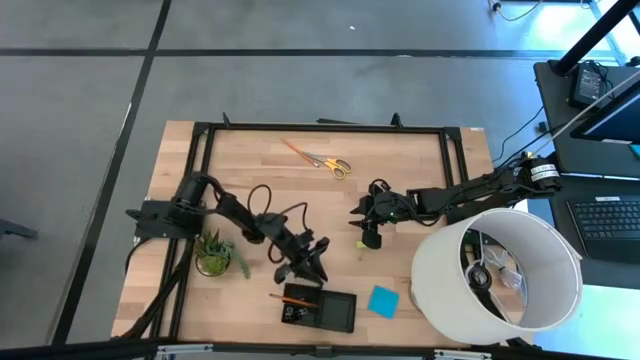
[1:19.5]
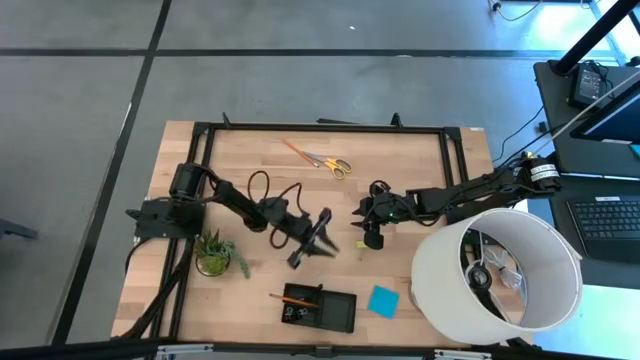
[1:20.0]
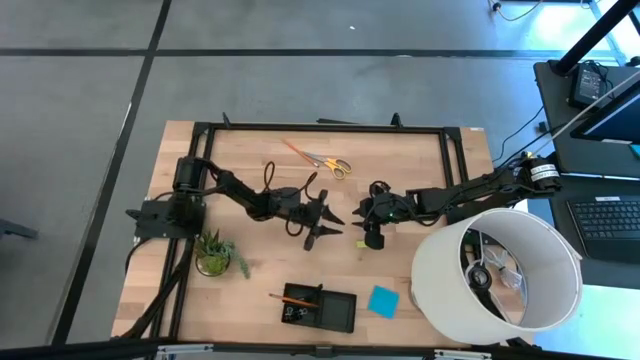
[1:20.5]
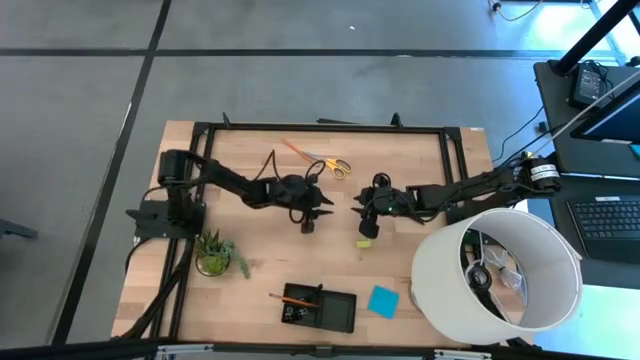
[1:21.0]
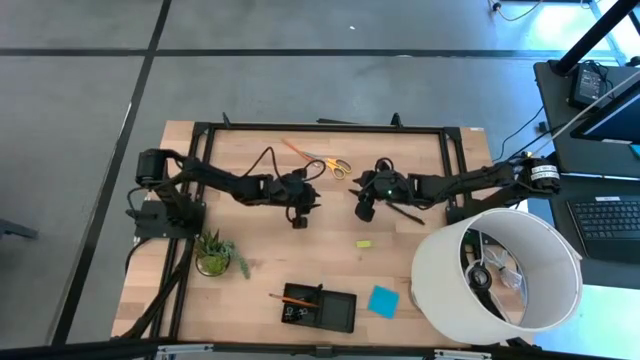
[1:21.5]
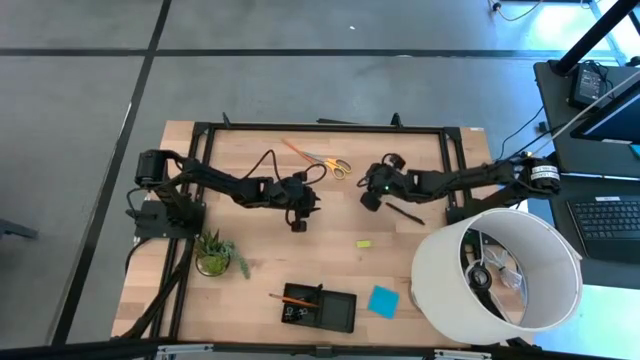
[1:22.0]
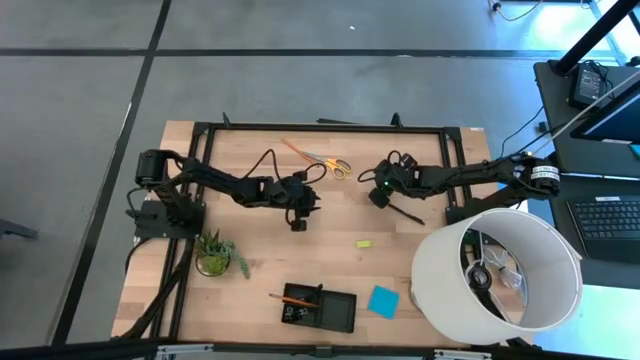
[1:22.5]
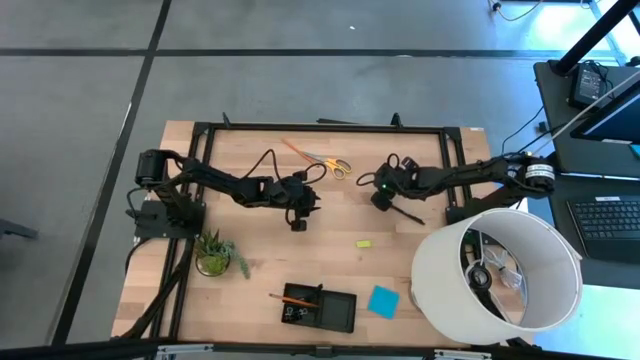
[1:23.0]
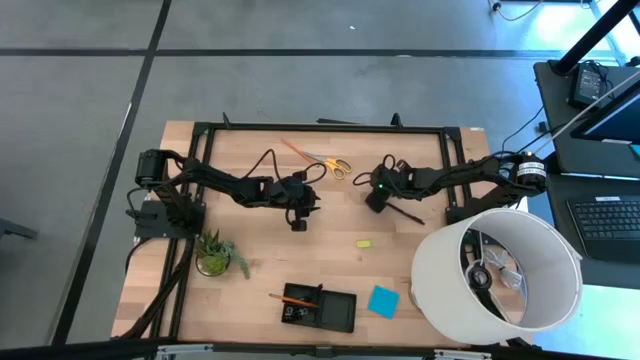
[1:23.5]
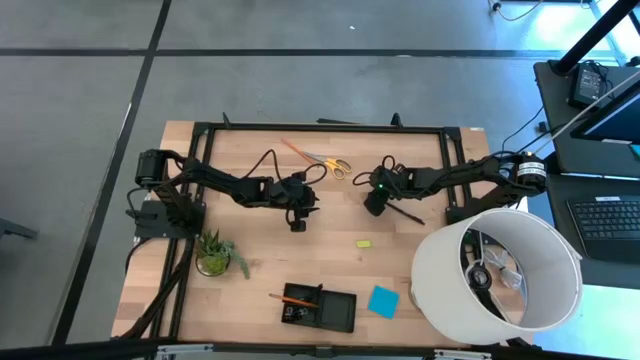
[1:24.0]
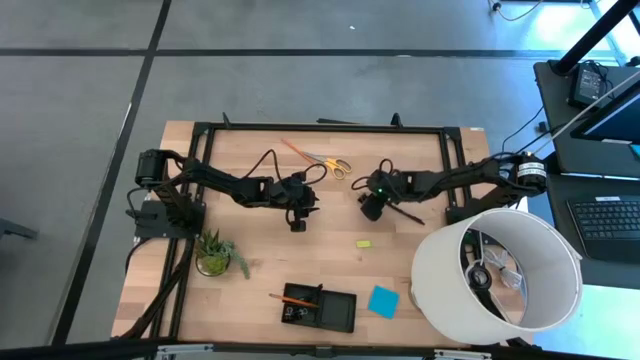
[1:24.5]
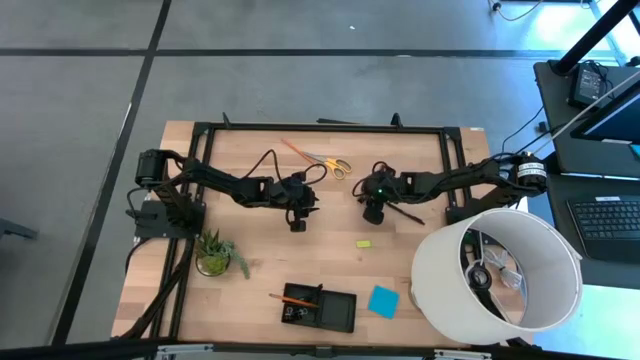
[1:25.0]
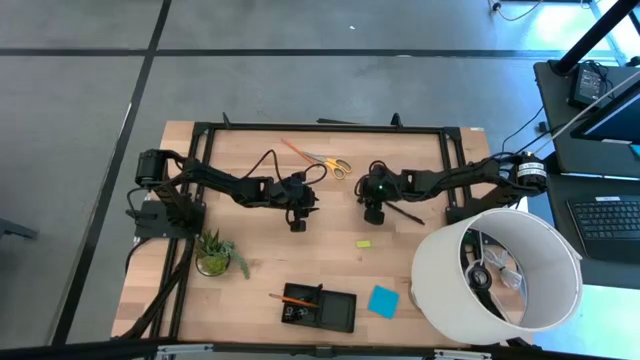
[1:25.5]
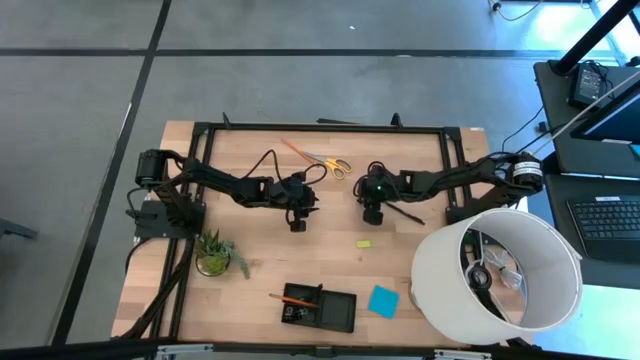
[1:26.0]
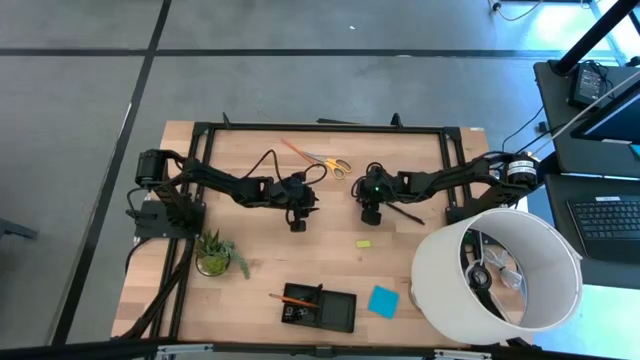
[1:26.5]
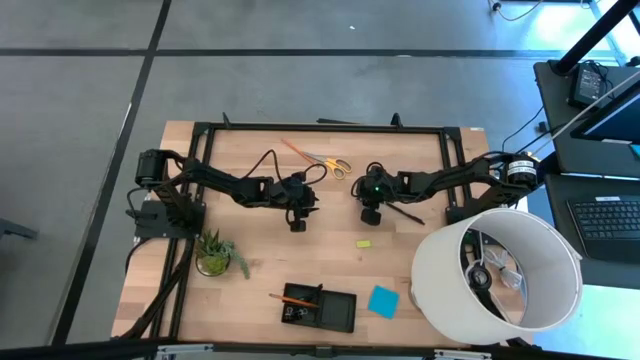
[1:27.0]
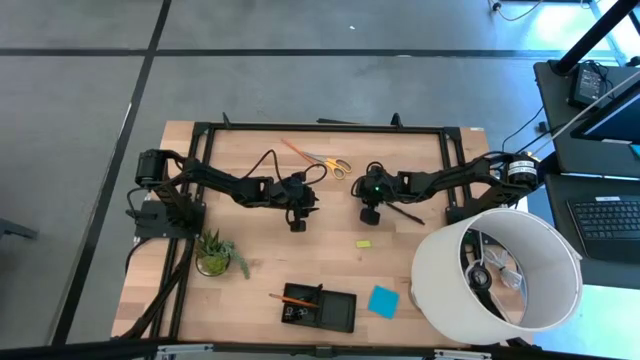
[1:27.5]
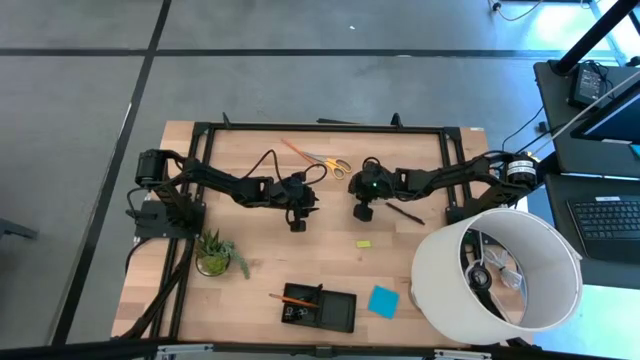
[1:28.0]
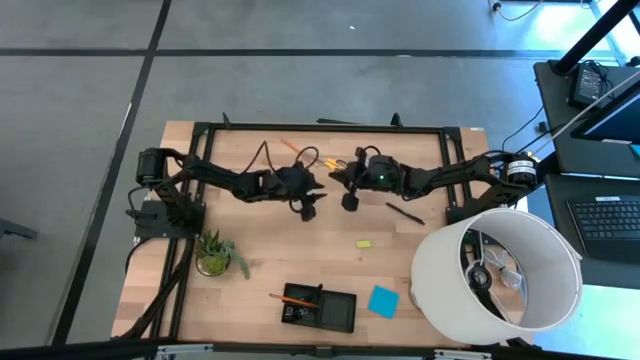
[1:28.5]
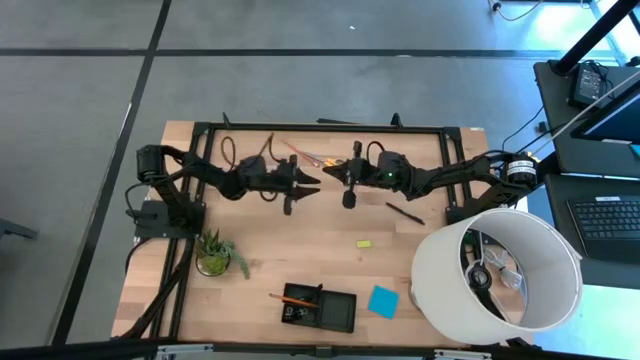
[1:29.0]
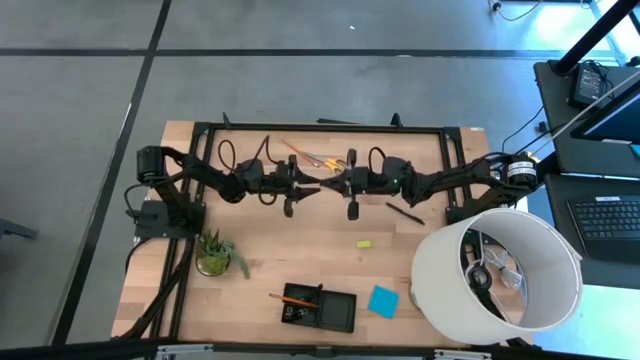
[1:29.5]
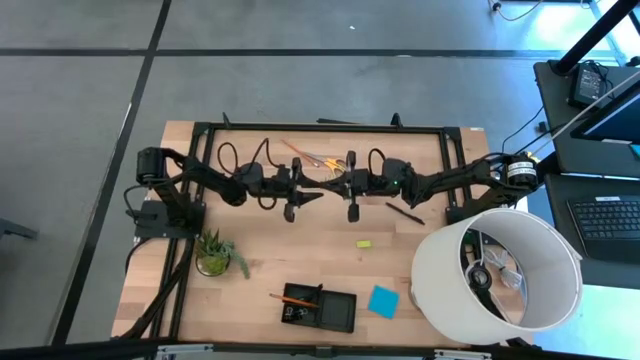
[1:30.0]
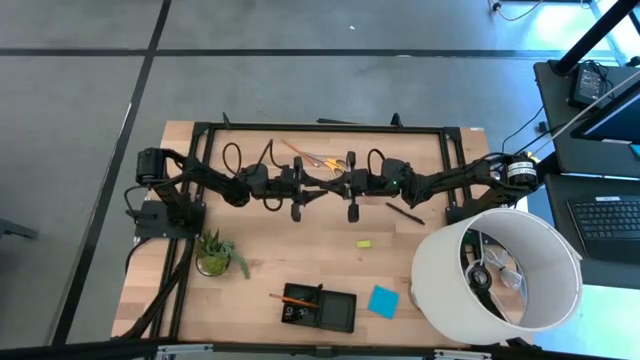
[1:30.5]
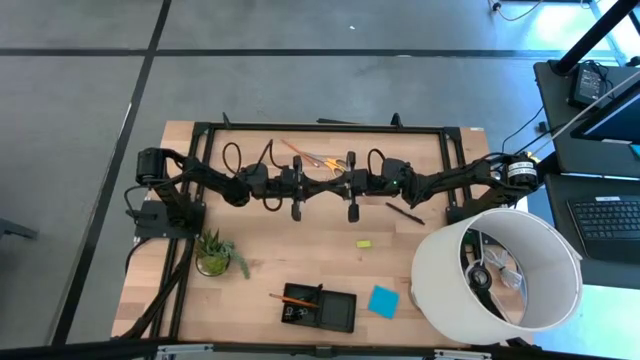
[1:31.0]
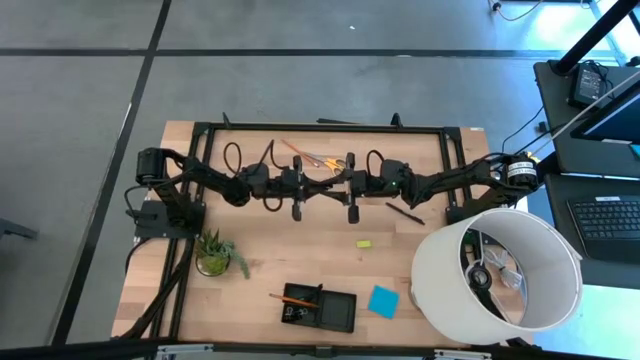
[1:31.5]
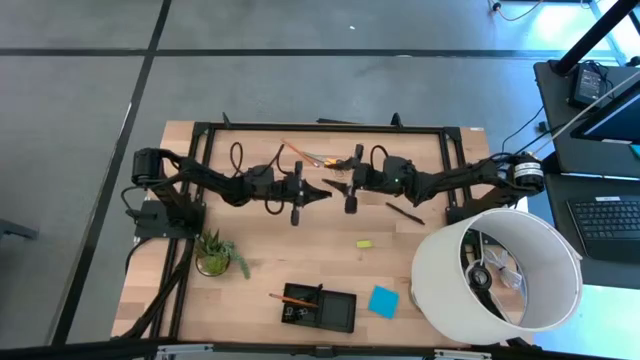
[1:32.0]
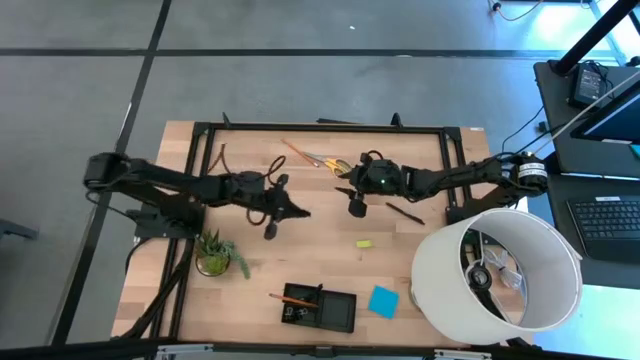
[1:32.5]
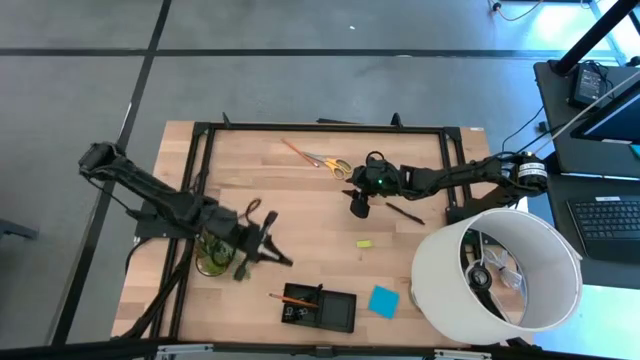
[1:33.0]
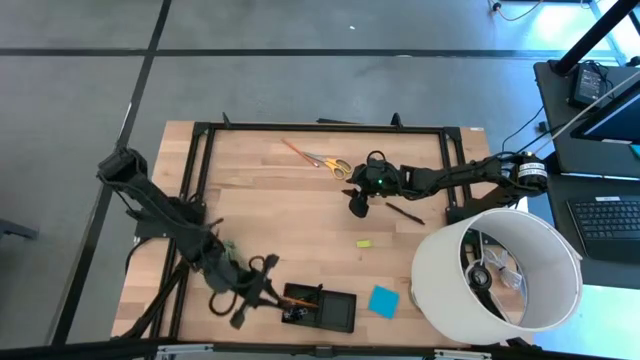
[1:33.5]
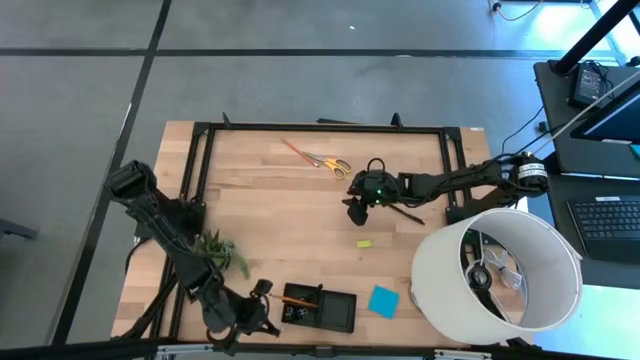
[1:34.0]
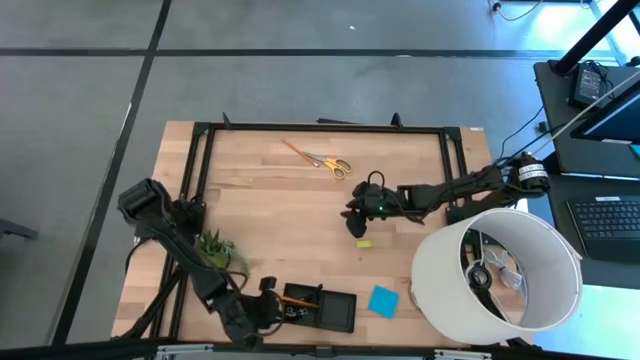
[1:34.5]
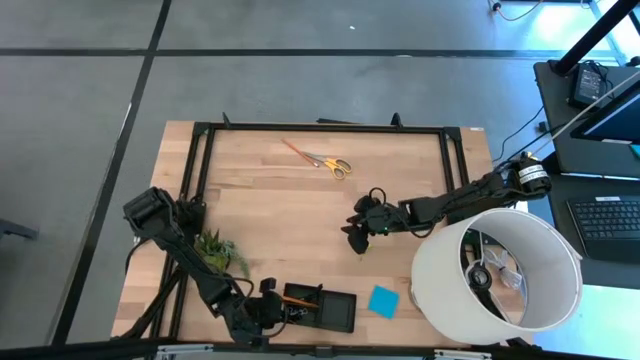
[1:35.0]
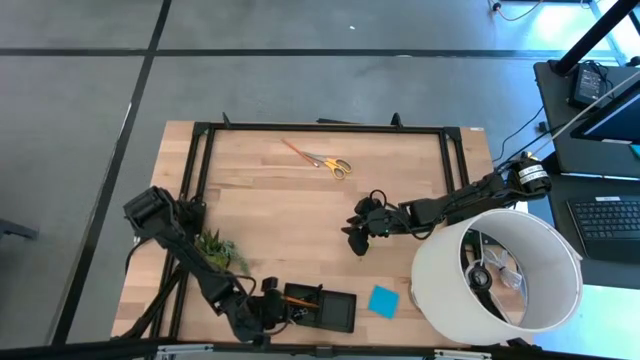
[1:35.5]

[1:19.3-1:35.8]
Task: Pick and place office supplies into organizer
Put the black binder clip into the black desk organizer

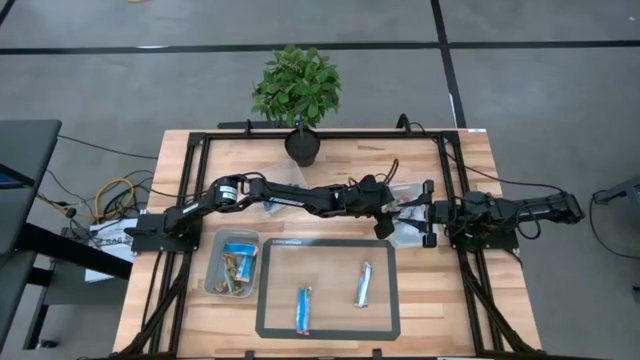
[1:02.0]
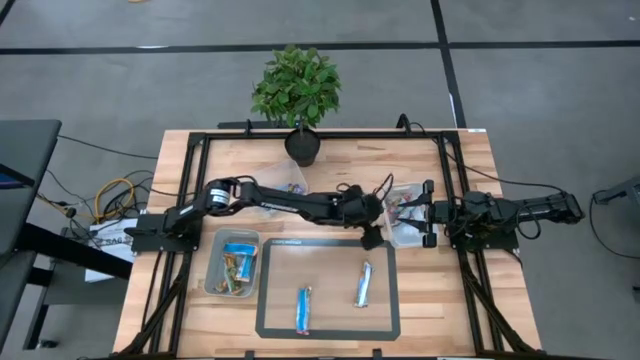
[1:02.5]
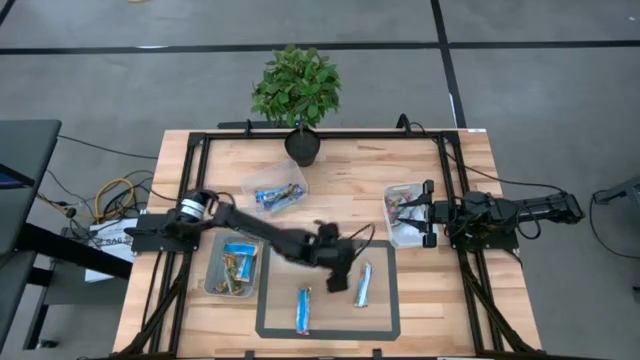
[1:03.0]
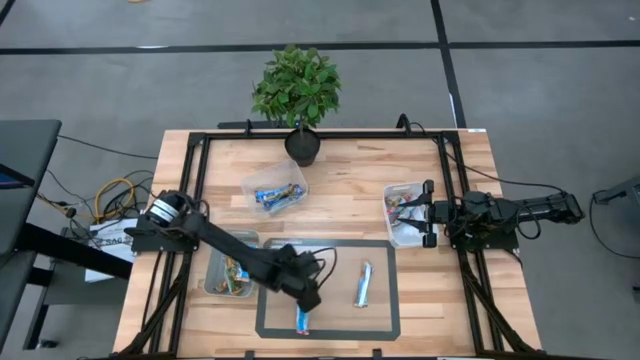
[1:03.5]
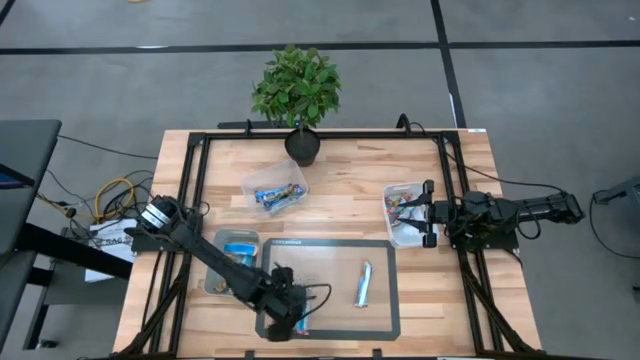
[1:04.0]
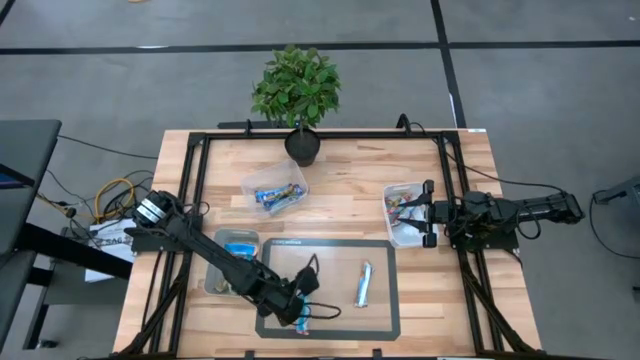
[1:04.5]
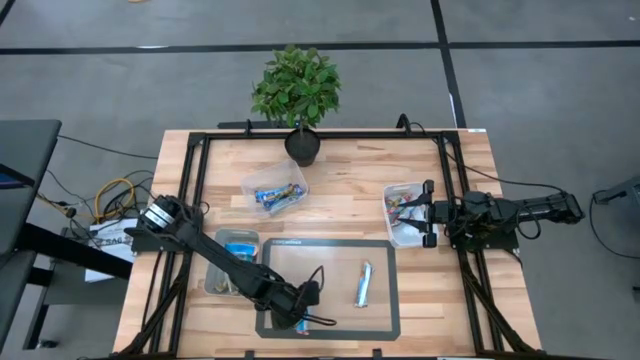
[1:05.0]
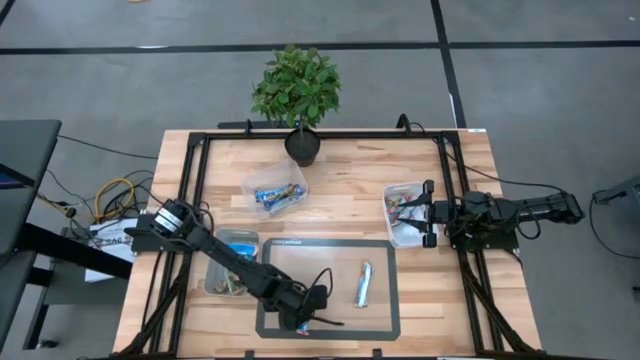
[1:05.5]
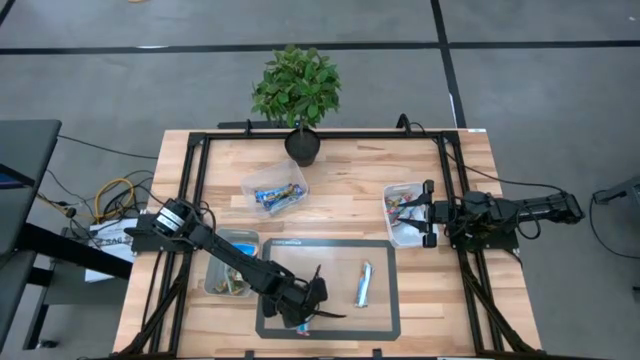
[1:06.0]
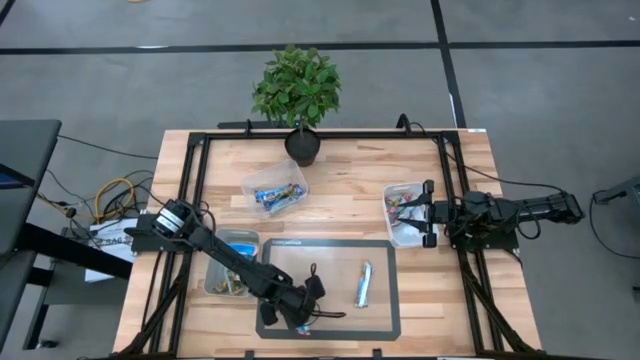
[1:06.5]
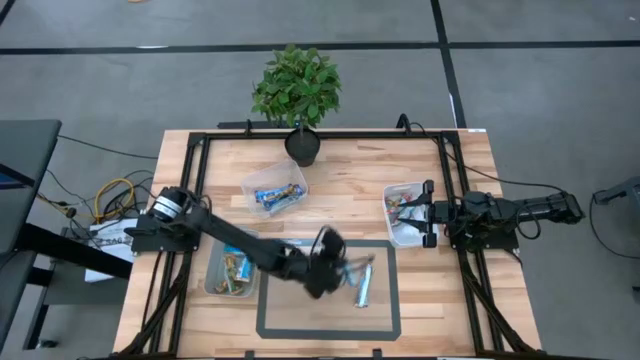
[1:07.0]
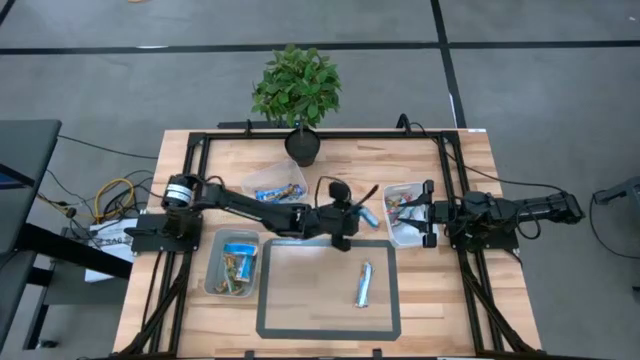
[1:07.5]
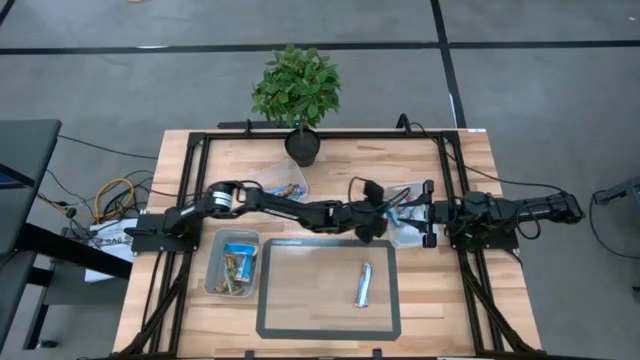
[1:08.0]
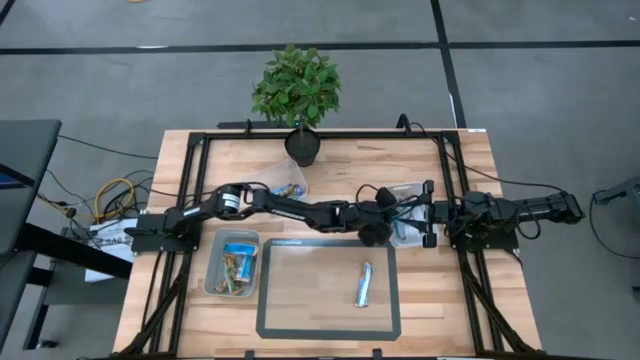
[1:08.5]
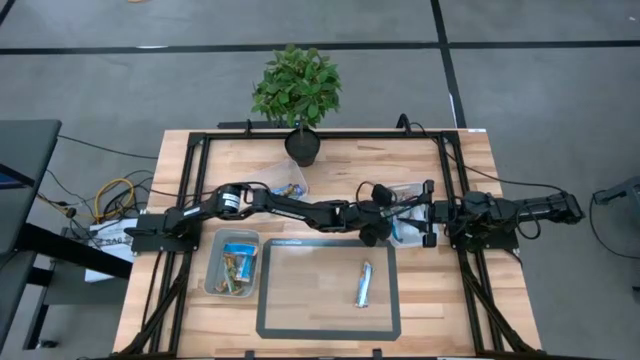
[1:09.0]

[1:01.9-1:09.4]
Task: Pick and place Granola Bars by type
Put the red granola bar into the white bin
